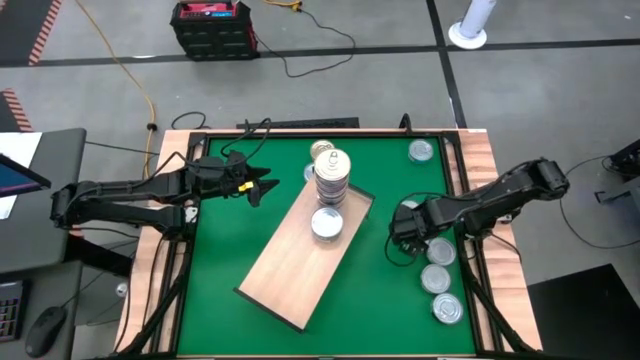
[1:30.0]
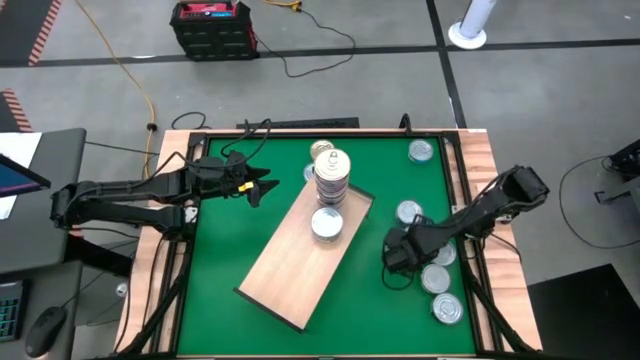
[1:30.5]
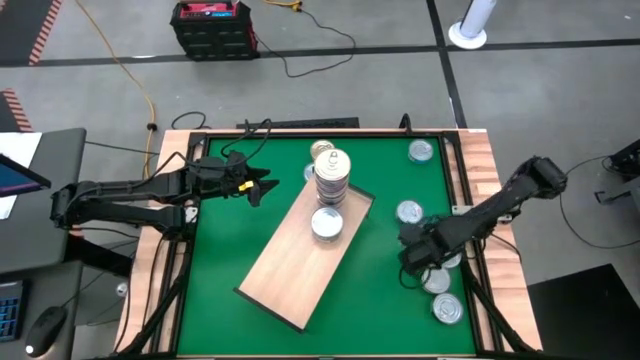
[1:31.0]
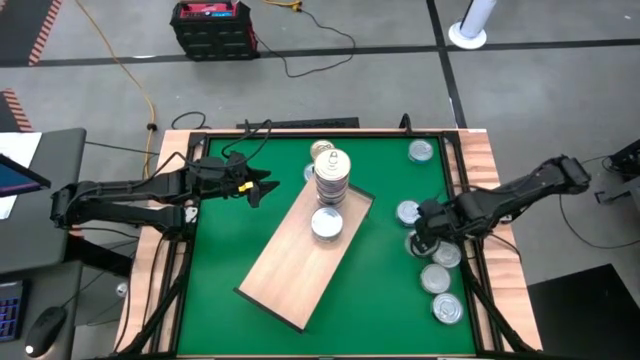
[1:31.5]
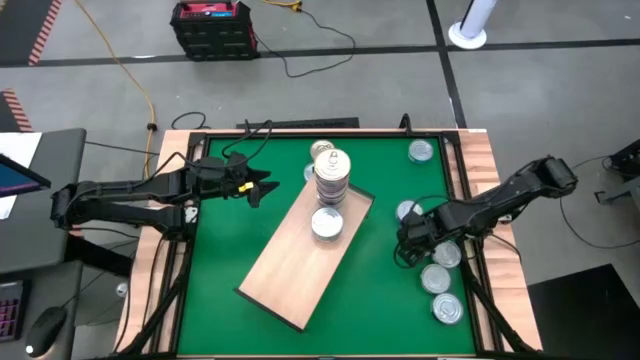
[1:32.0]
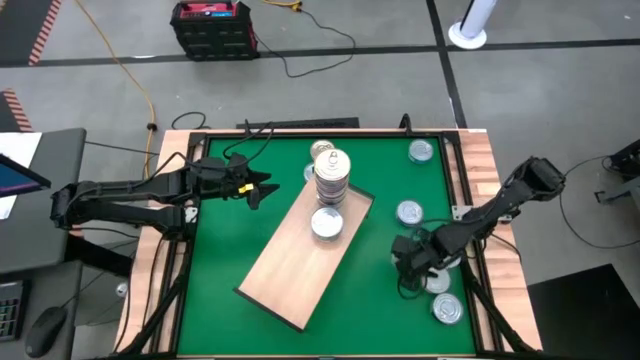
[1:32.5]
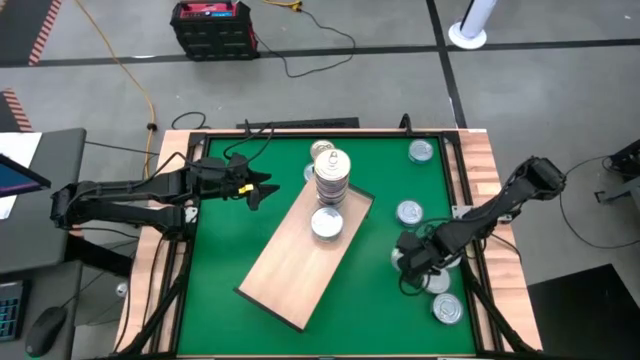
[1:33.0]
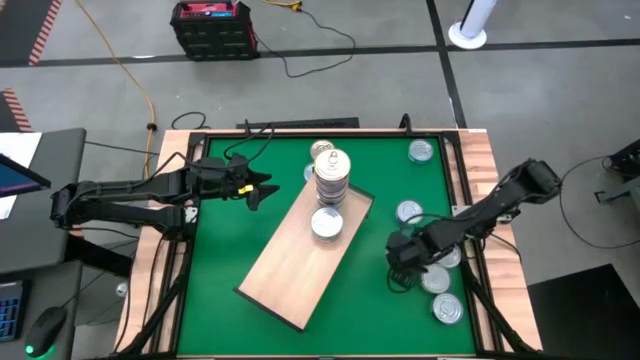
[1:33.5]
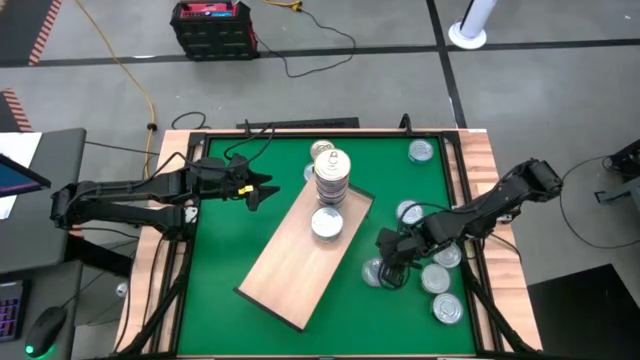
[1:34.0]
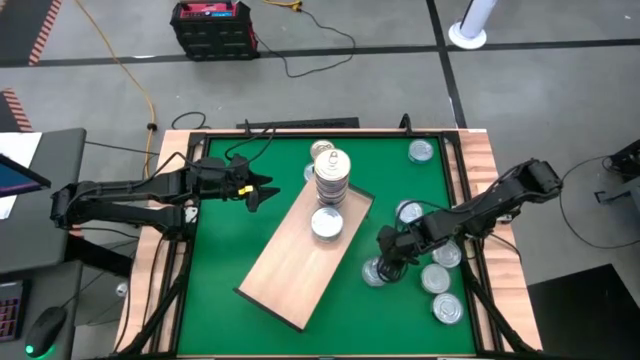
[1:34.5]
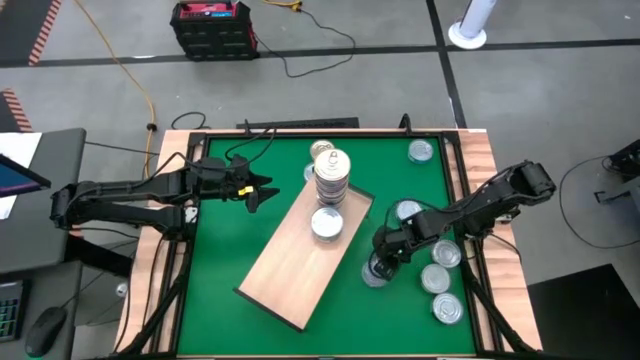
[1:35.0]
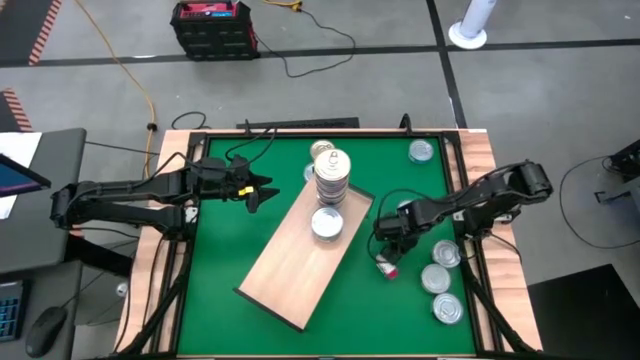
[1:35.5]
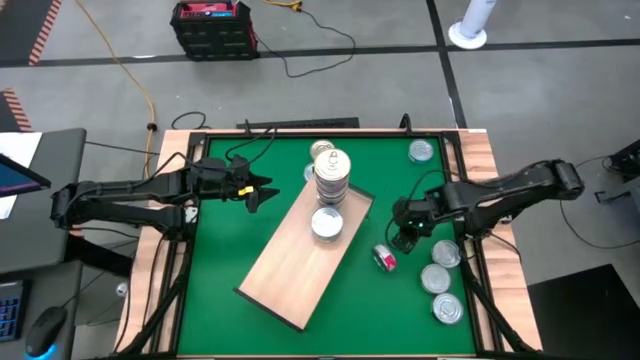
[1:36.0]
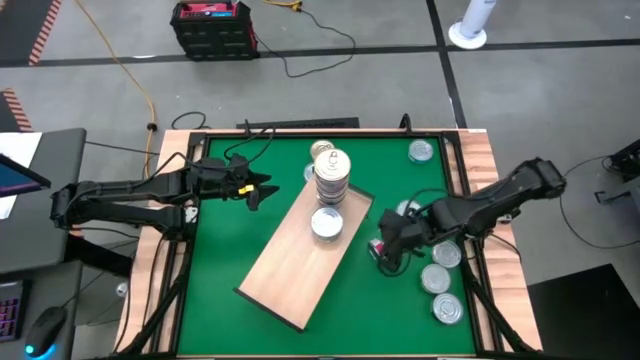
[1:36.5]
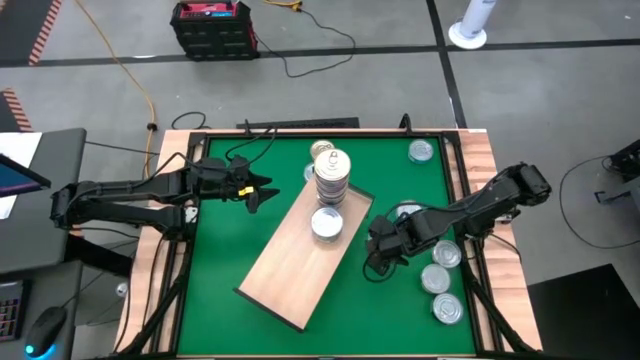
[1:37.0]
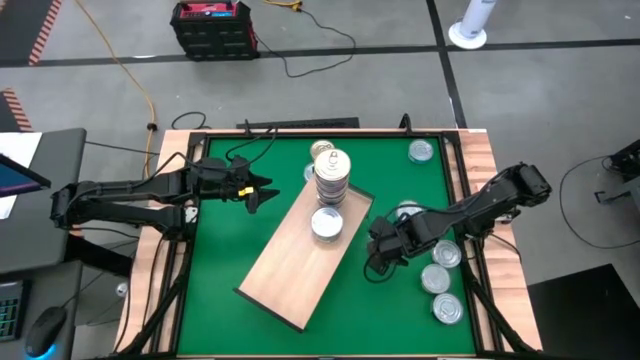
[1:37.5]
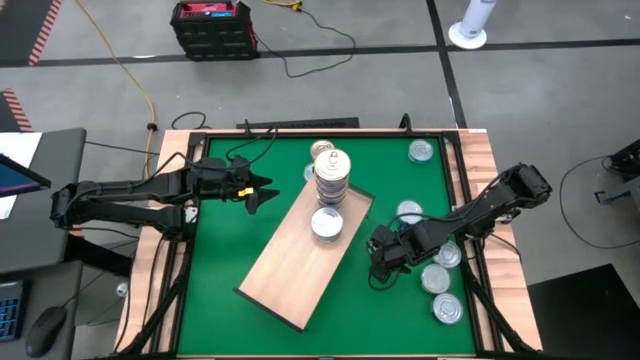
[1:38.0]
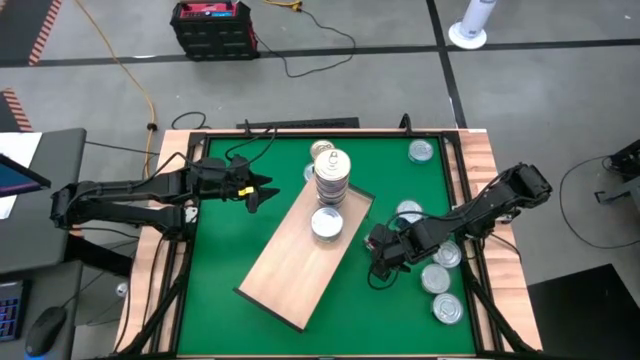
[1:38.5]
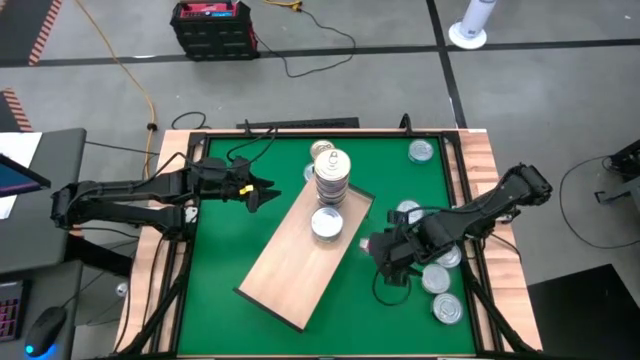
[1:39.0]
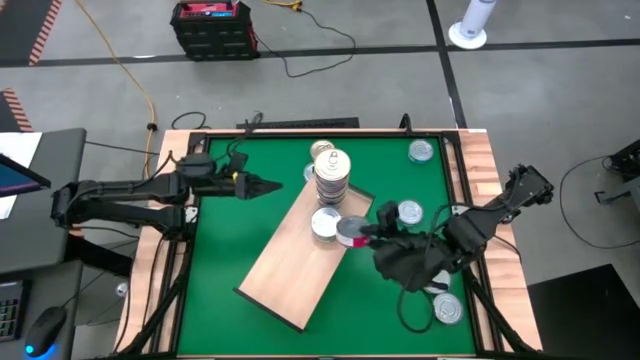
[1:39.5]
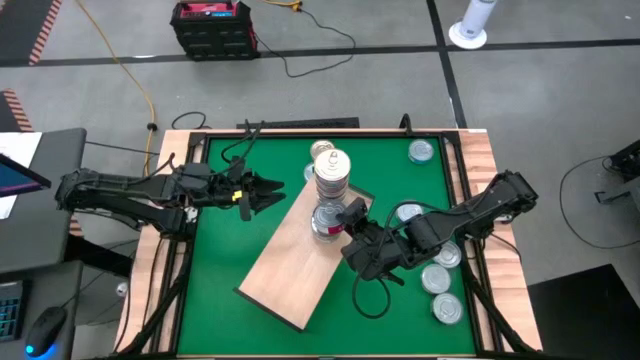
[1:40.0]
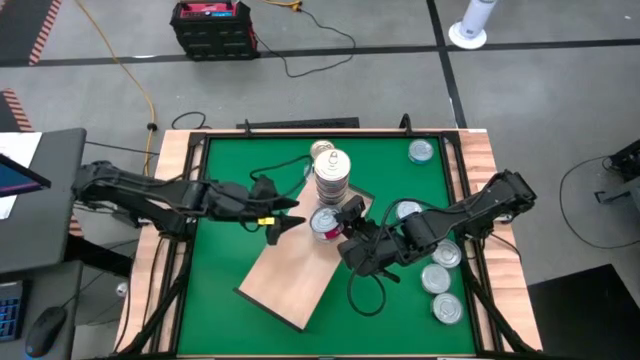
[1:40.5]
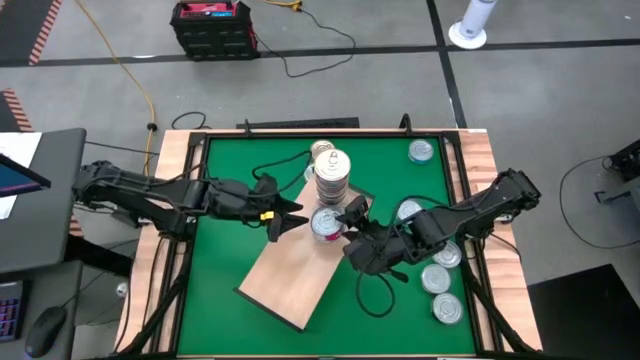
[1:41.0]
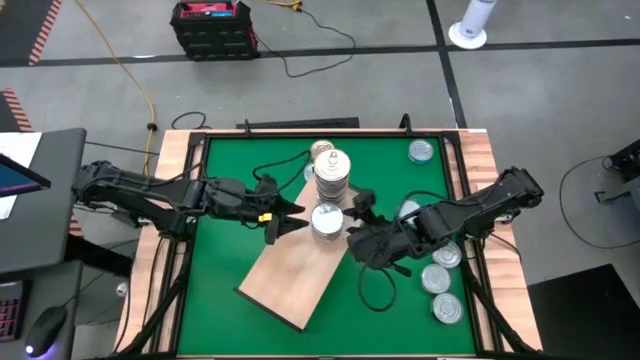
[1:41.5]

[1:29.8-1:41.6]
Task: Stack canned seafood by type on shelf
Stack the red tuna can on top of the green tuna can on the shelf

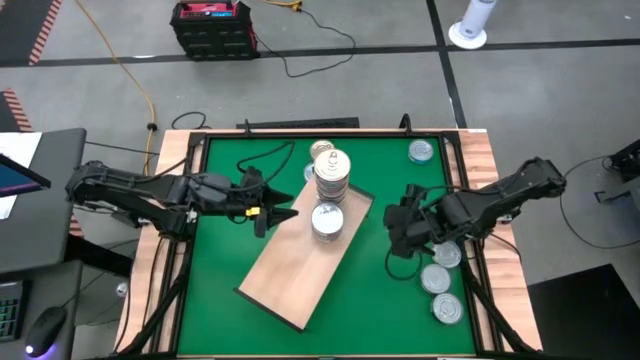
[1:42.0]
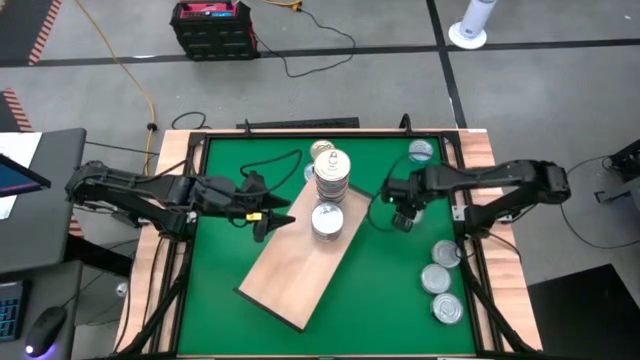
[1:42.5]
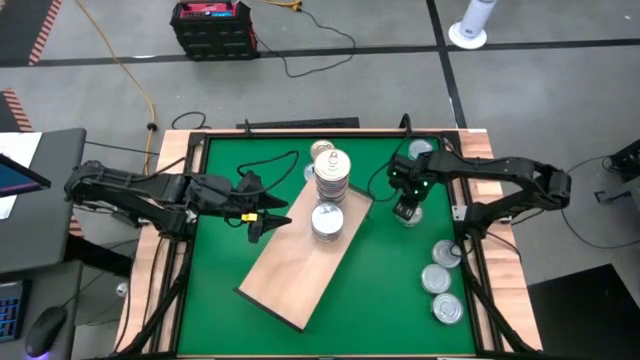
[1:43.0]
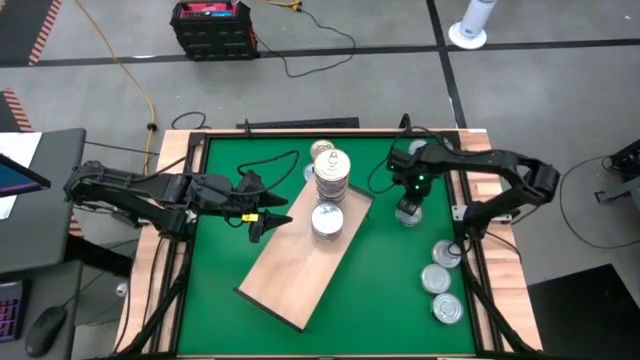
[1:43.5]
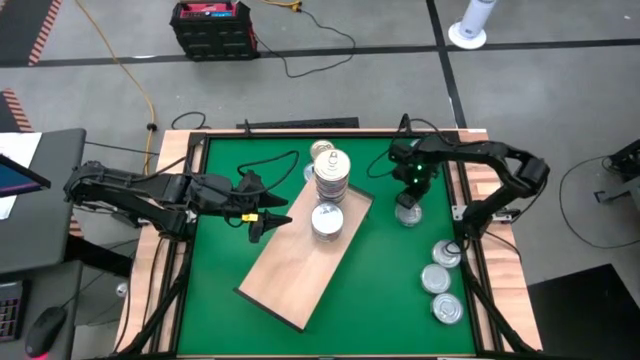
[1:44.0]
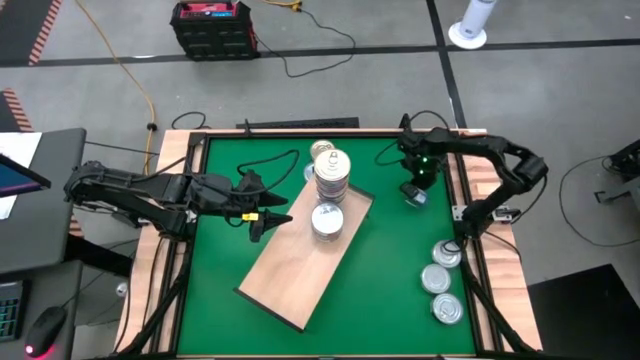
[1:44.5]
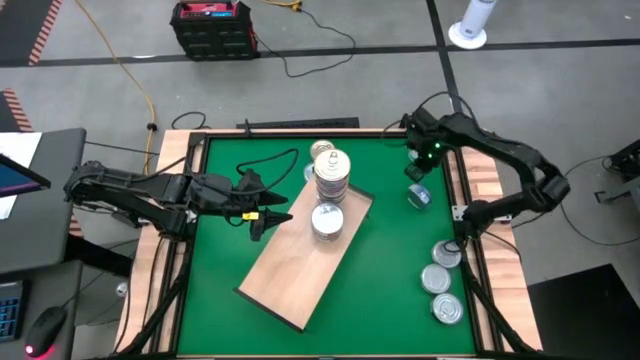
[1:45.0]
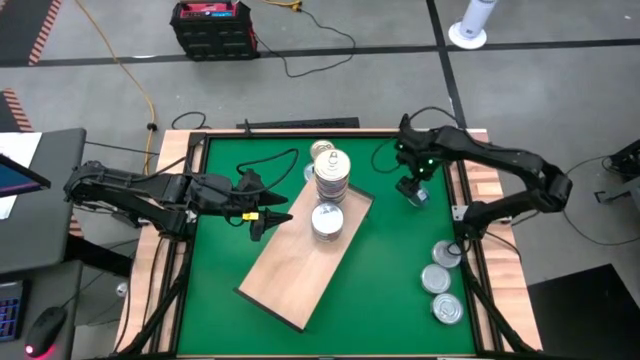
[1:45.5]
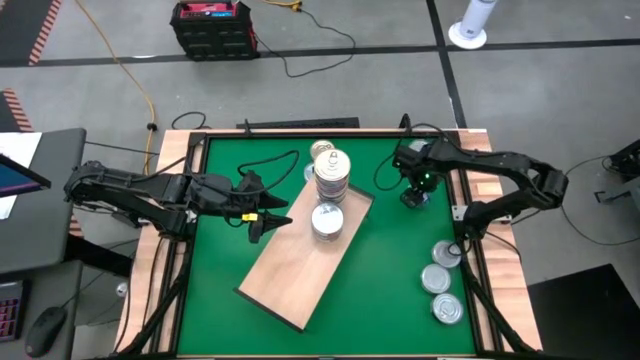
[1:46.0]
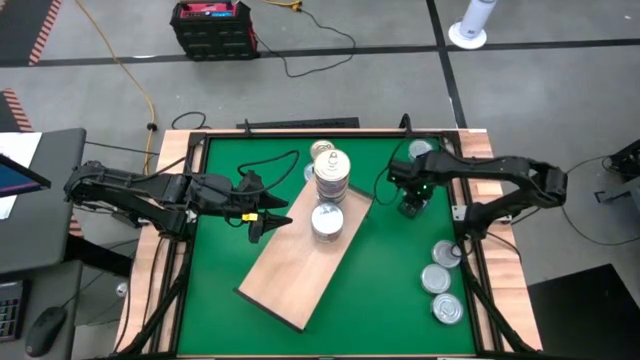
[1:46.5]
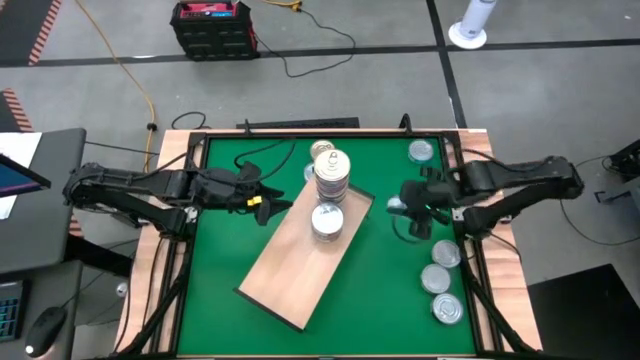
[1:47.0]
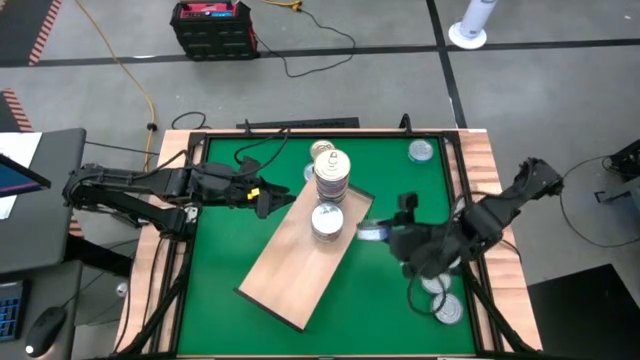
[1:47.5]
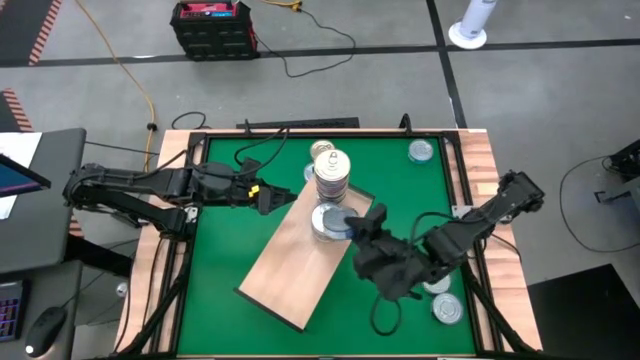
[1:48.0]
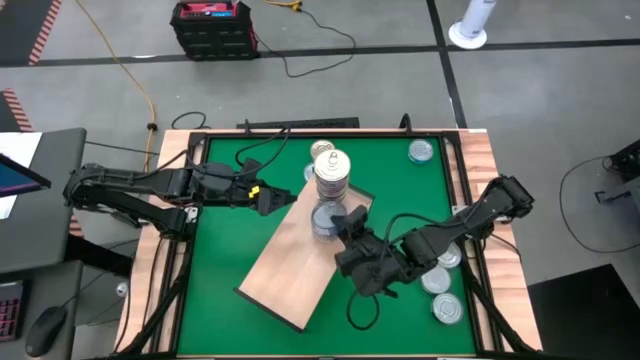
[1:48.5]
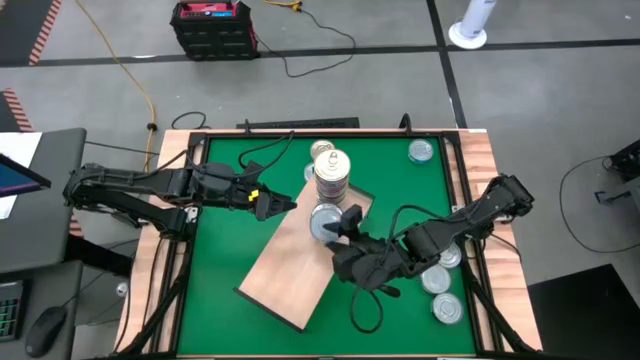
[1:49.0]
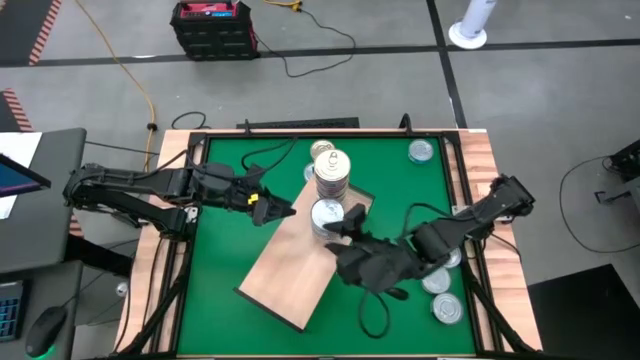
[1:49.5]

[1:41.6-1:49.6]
Stack the blue tuna can on top of the red tuna can on the shelf

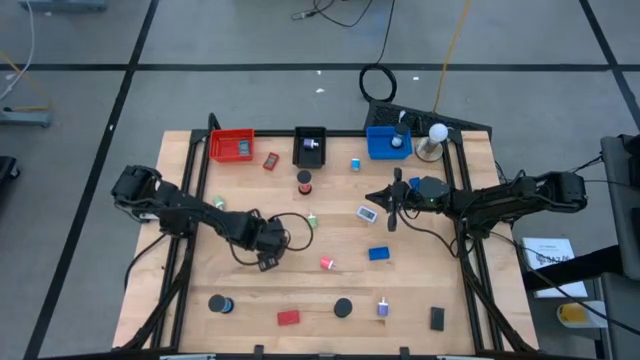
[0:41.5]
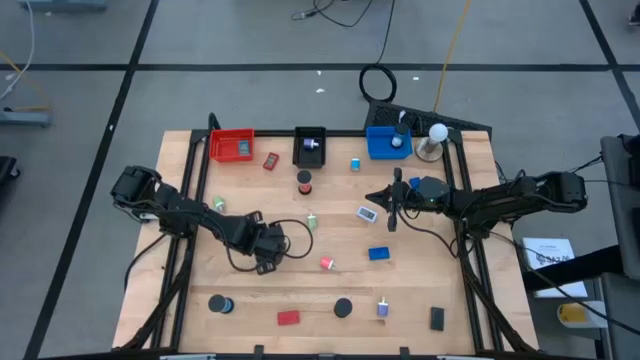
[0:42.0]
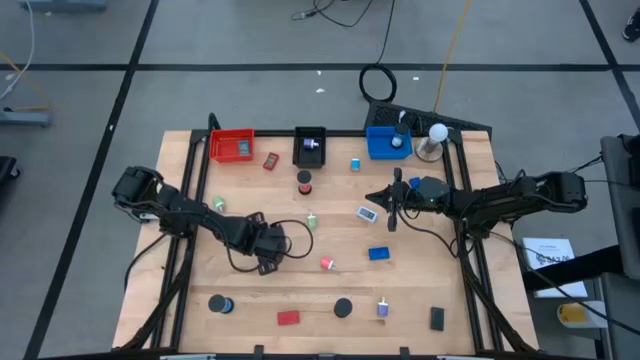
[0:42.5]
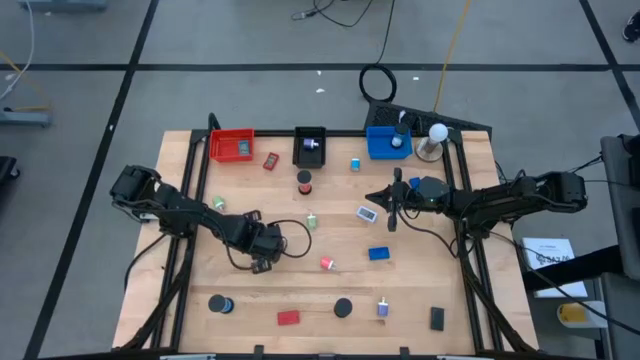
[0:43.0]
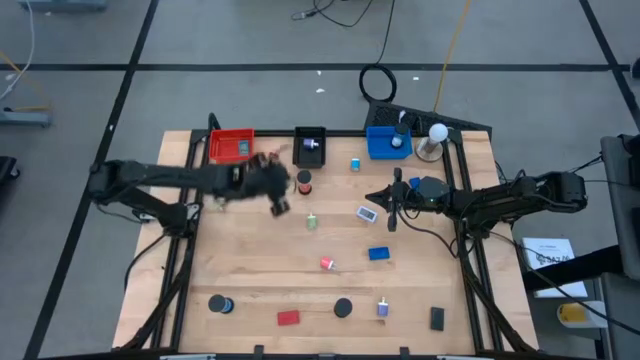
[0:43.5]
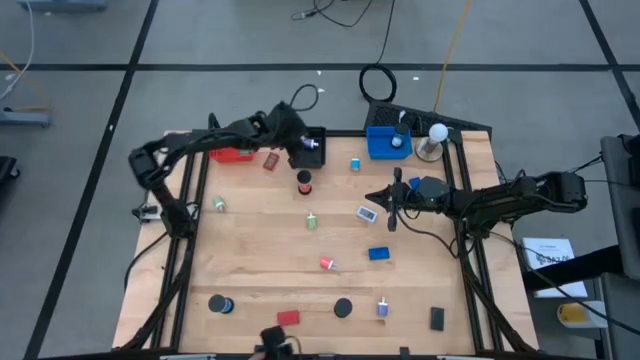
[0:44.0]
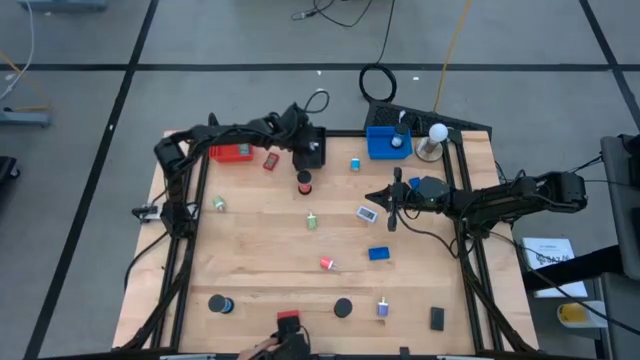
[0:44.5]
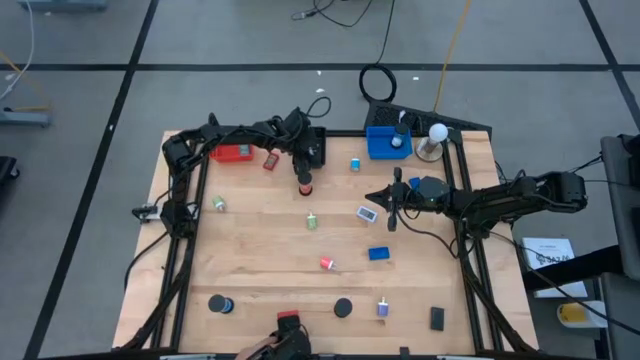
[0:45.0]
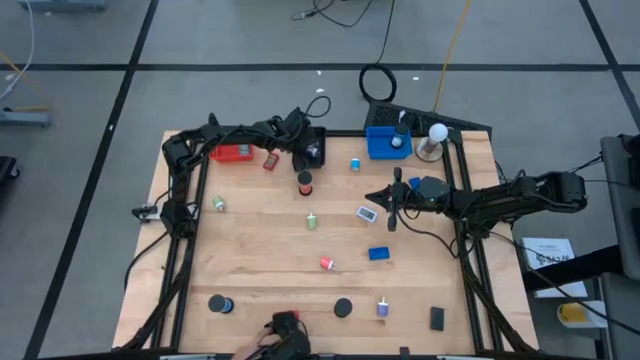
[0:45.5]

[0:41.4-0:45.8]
Task: Pick & Place Office items
Put the left blue charger adapter head into the black bin
